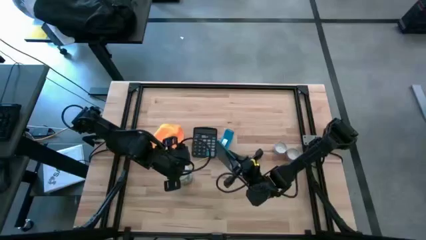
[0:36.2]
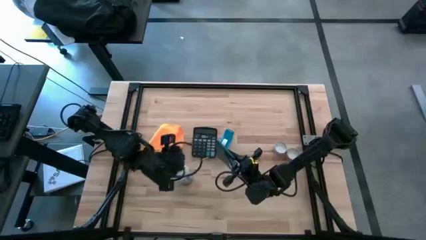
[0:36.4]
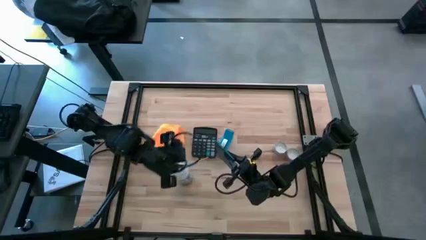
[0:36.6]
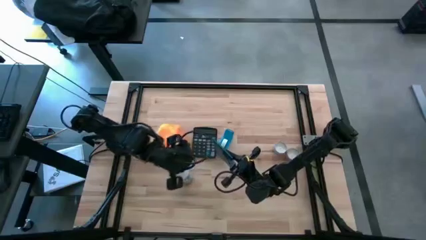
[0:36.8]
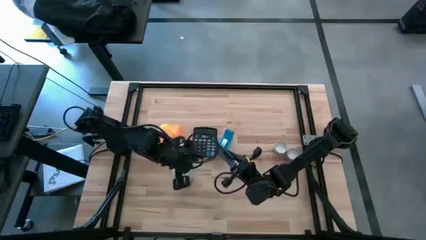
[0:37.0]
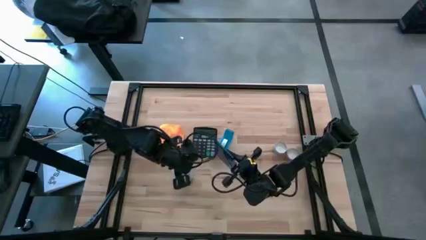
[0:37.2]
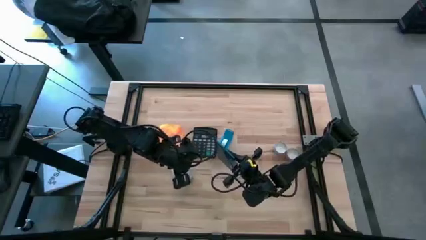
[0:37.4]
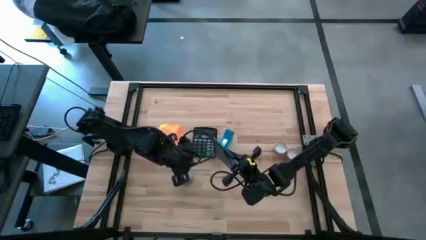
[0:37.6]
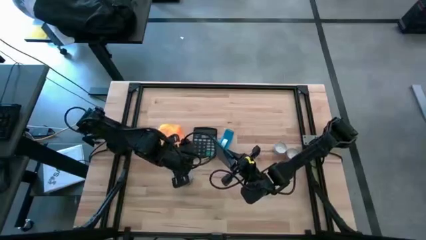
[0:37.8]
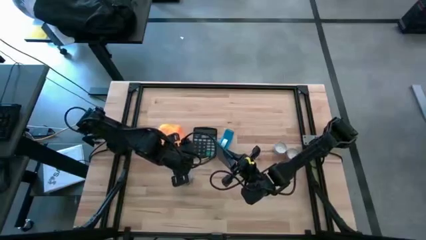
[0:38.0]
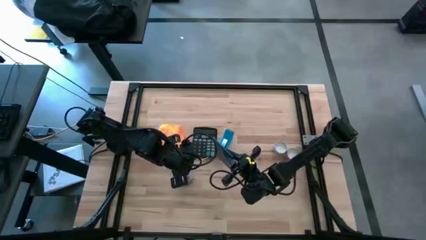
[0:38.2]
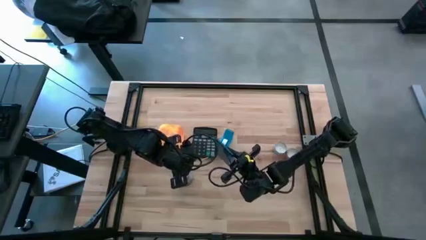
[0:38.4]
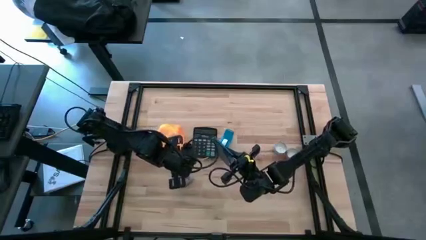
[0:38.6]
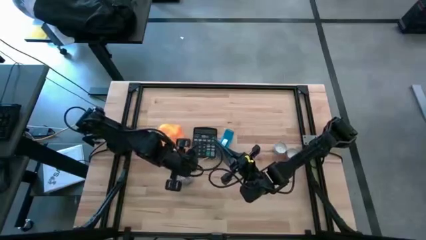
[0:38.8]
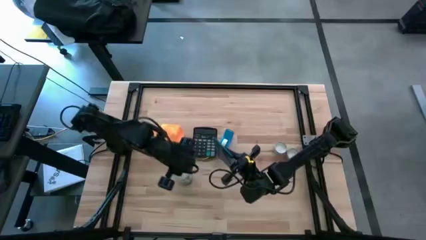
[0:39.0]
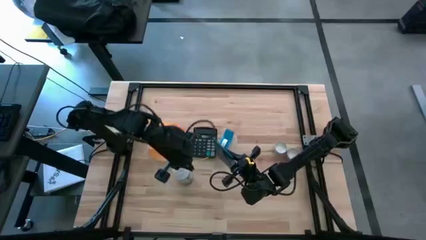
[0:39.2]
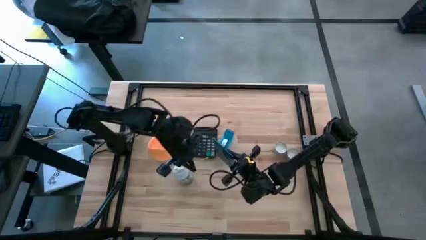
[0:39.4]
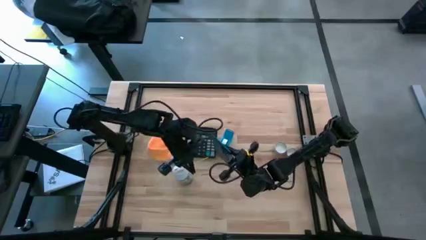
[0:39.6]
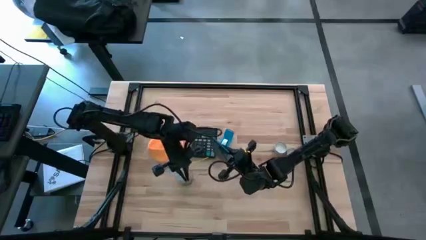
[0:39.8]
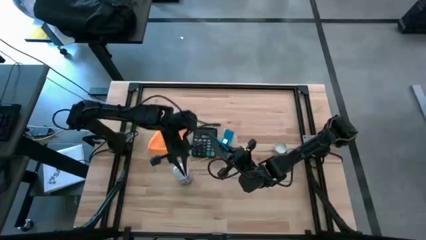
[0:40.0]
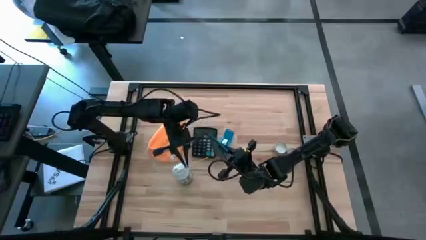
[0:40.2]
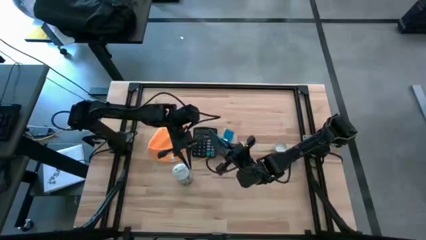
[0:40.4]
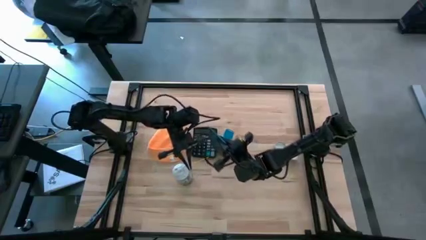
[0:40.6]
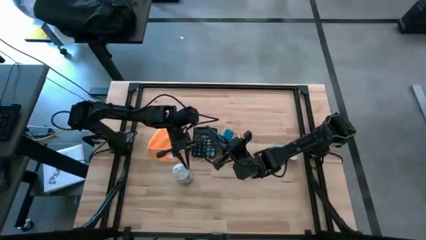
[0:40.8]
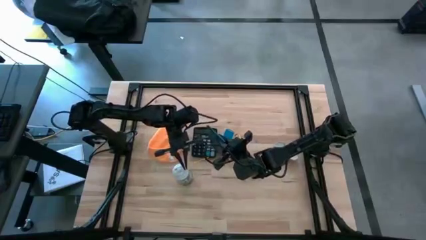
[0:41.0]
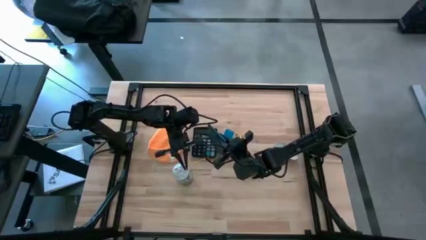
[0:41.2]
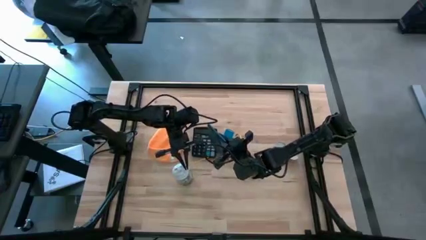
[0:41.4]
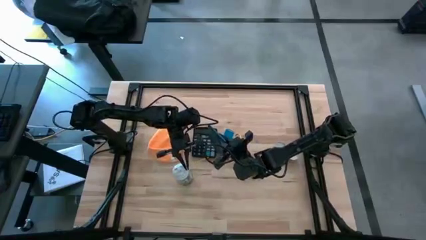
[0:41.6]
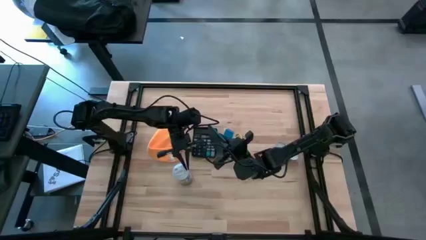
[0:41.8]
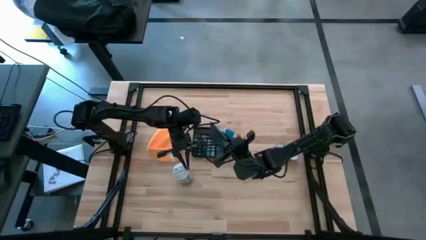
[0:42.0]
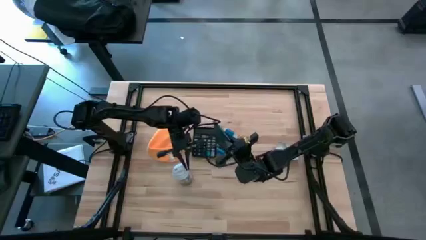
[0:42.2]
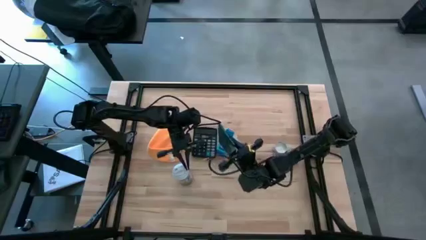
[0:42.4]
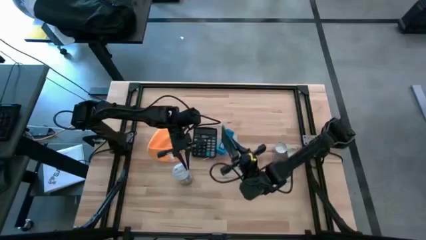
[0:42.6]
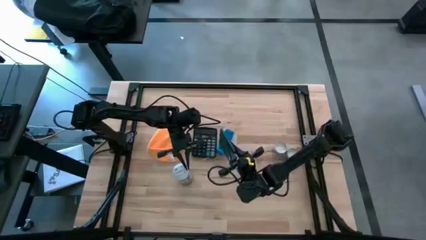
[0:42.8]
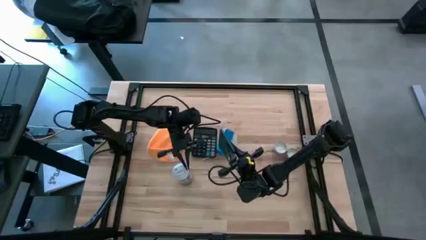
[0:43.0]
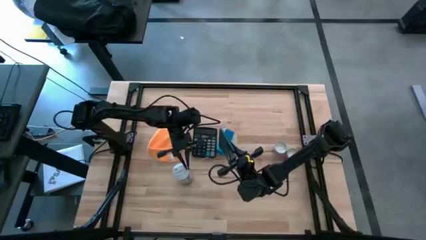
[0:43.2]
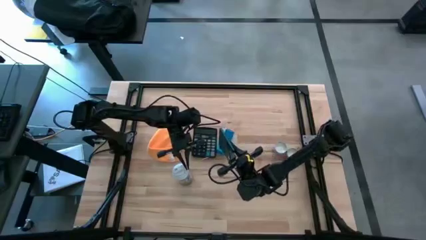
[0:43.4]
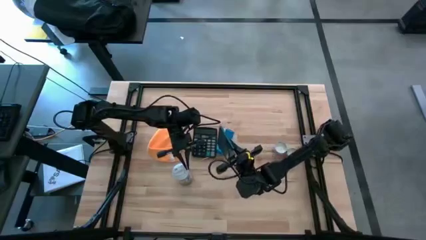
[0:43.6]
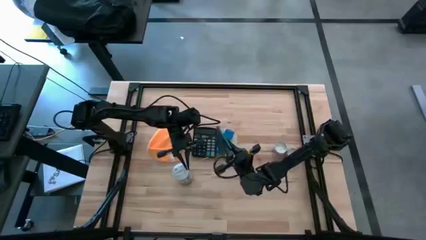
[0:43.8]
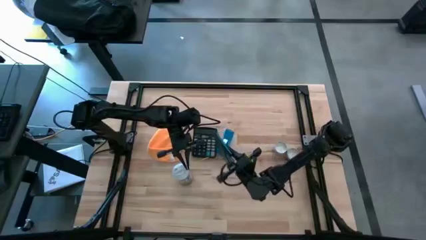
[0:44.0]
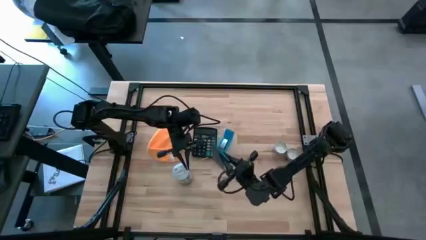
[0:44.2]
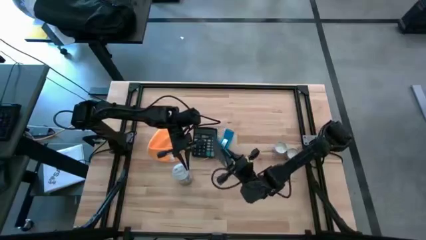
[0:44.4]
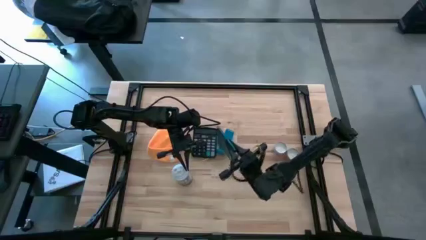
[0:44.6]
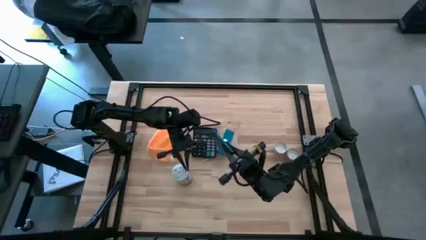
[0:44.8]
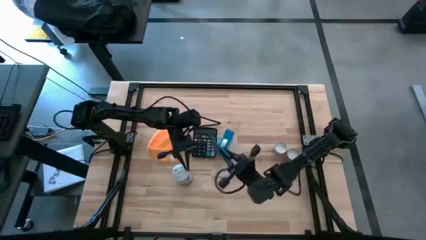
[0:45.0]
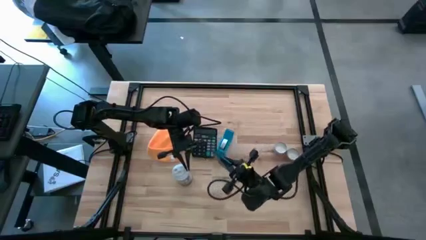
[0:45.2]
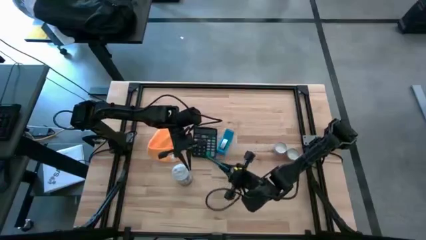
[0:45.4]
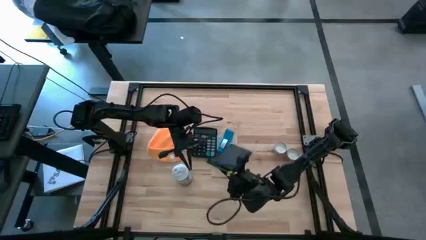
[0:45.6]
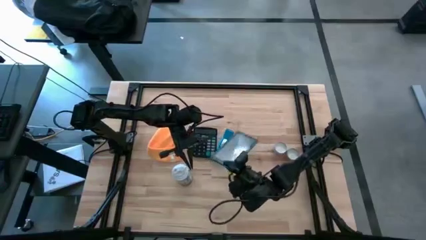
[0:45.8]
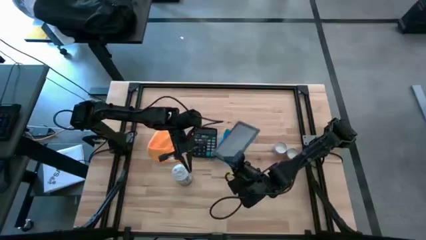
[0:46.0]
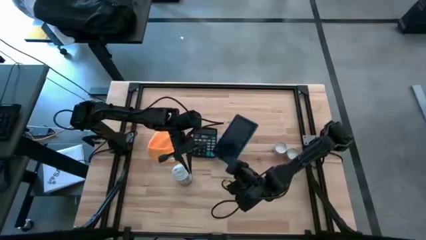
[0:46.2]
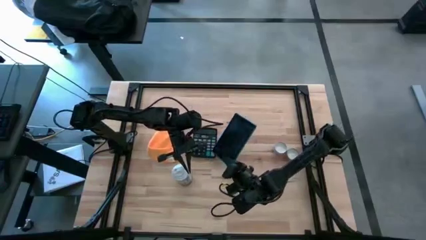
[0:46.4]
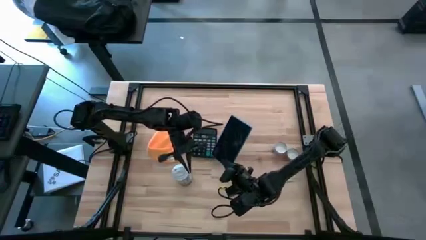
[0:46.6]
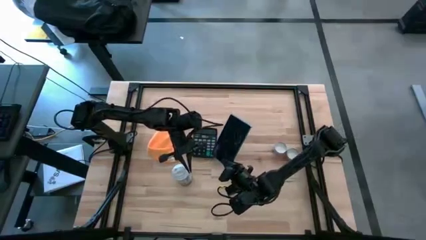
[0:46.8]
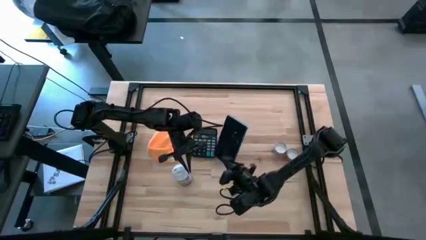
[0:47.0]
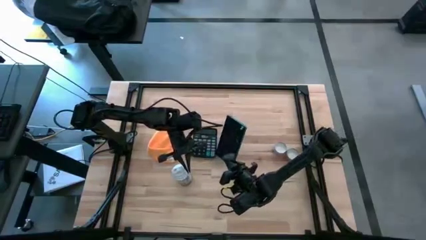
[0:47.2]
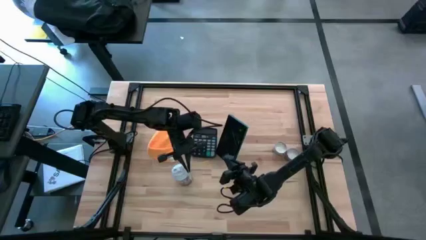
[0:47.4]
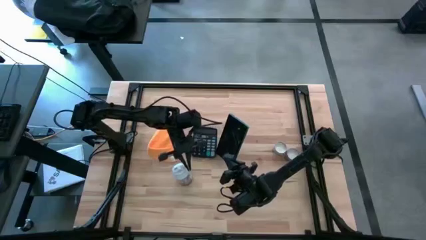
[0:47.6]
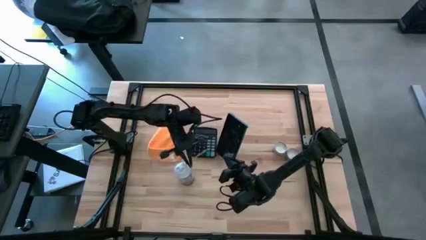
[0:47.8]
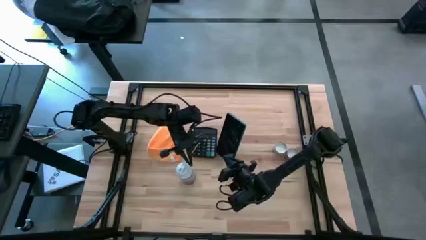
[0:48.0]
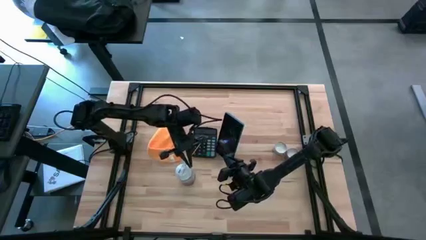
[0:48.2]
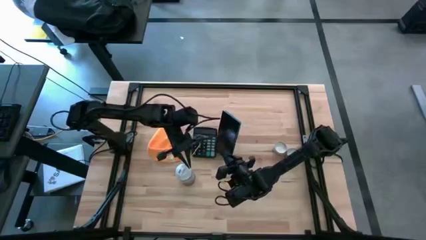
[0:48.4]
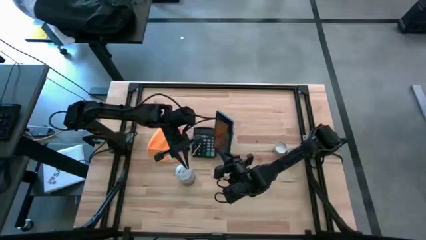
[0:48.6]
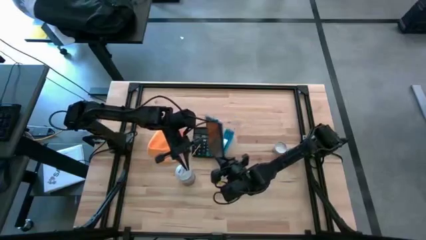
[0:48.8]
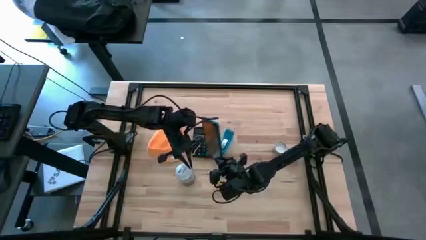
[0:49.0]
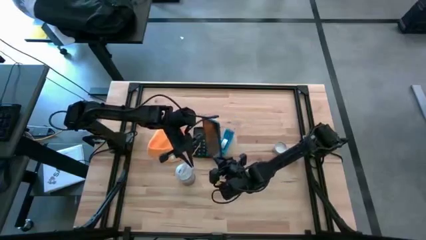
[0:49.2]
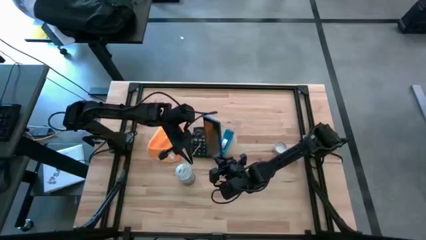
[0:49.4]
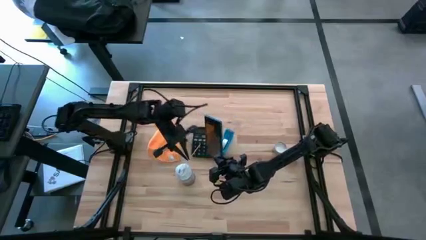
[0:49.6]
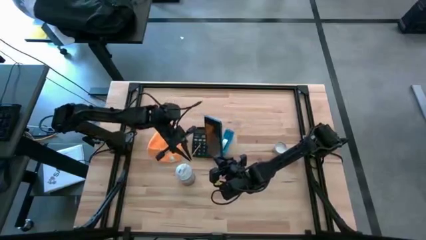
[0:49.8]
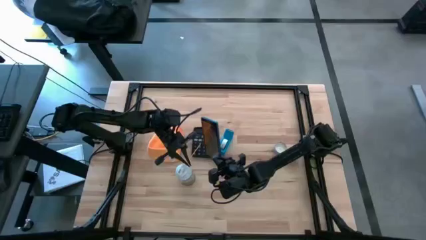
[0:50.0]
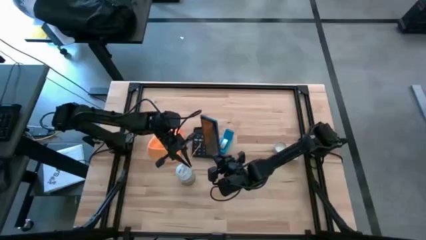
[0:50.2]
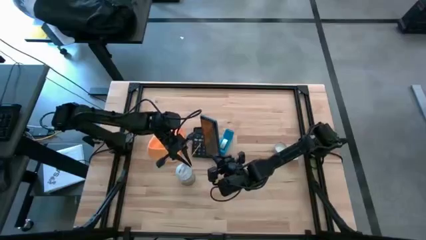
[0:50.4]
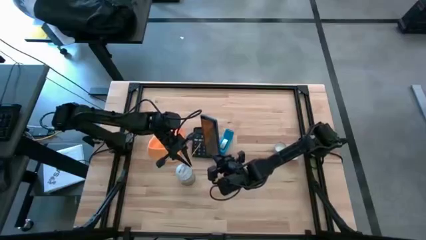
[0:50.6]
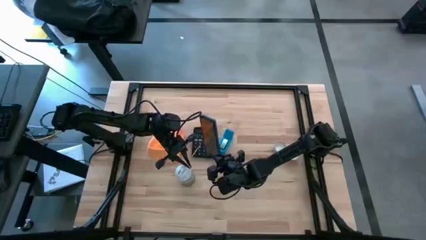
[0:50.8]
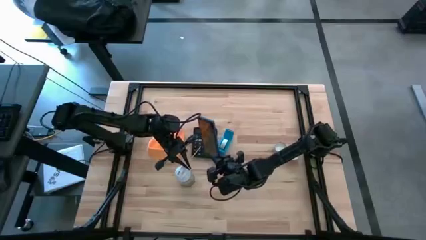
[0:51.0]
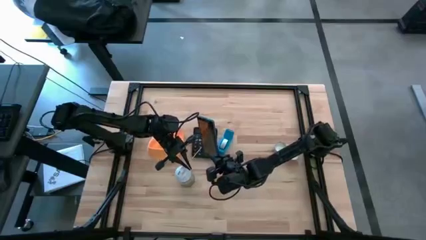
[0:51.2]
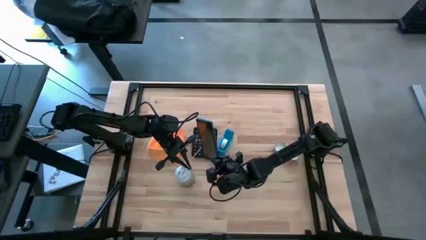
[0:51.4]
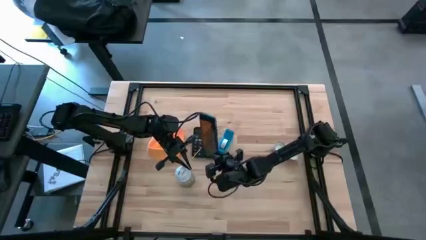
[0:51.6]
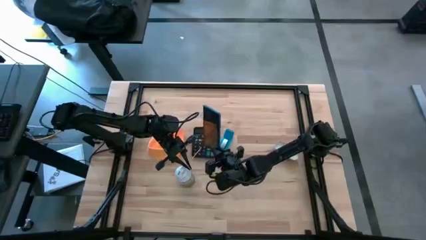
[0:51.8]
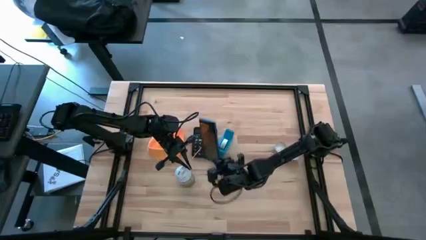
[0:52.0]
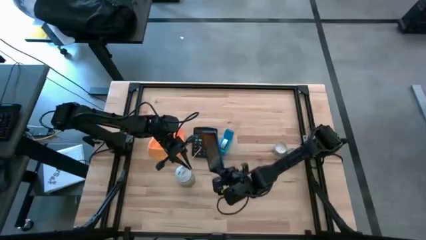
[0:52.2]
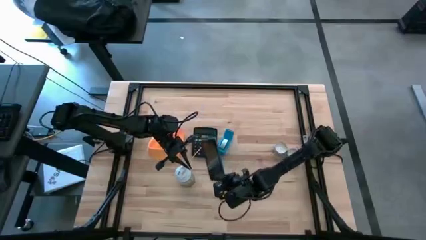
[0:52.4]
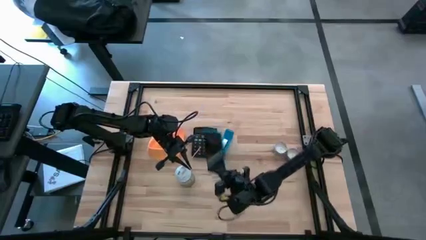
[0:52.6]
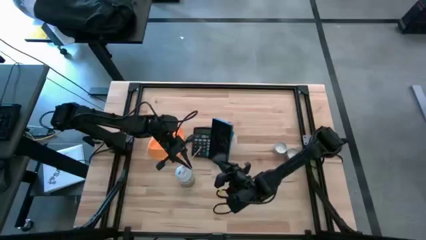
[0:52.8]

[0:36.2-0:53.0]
Task: Apply microfiber cloth
Wipe the tablet with the orange microfiber cloth
